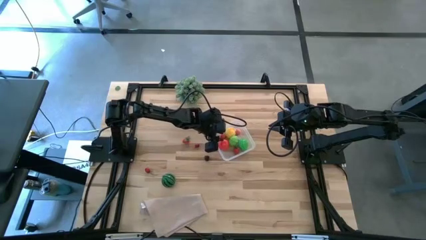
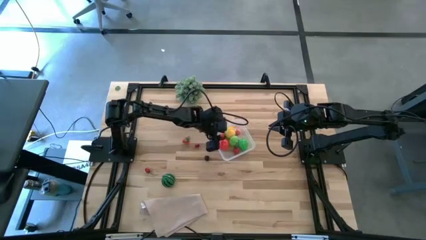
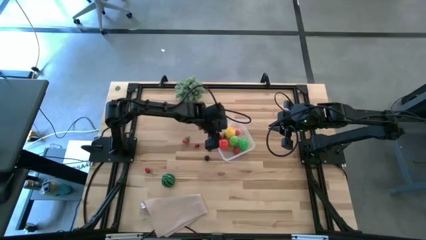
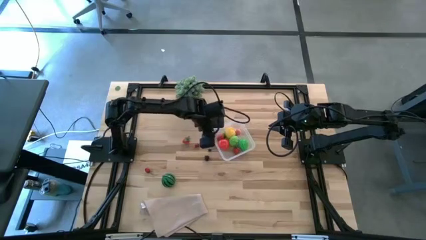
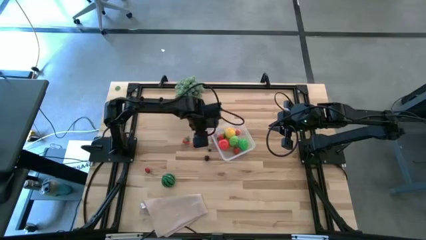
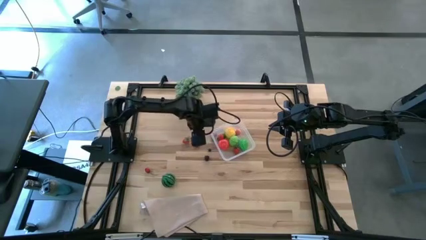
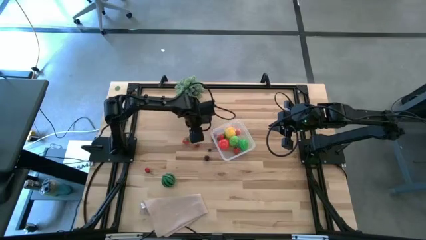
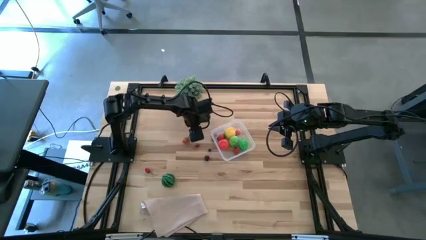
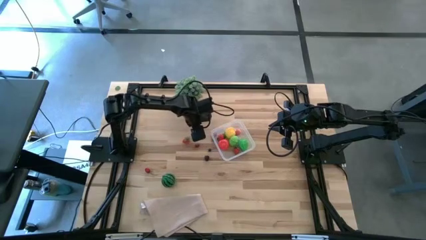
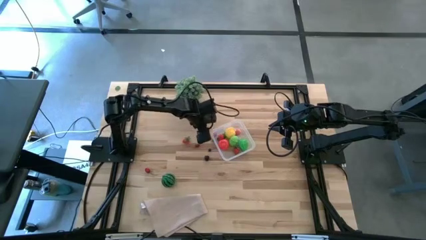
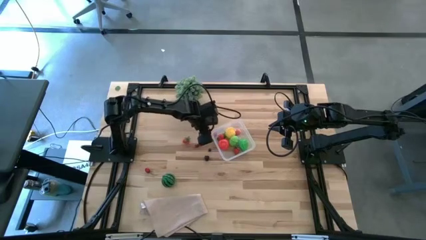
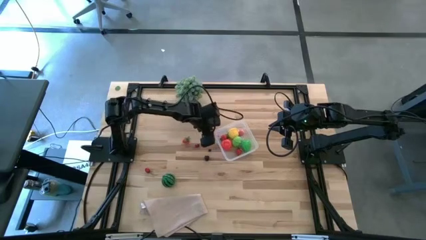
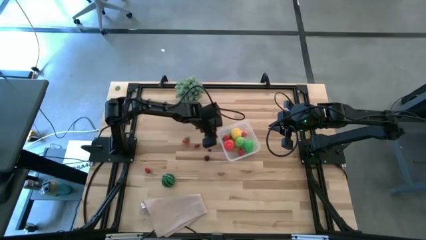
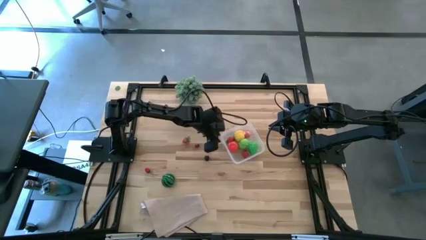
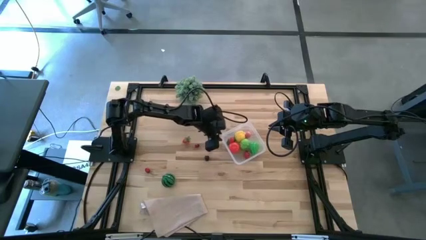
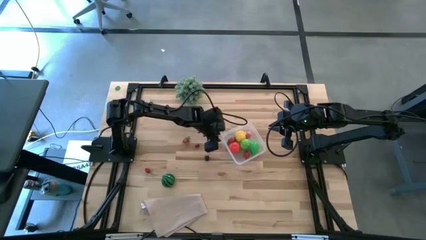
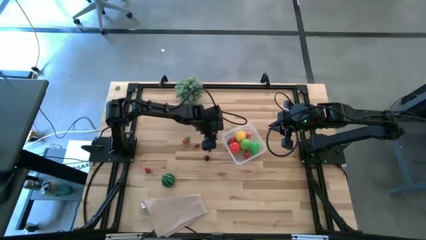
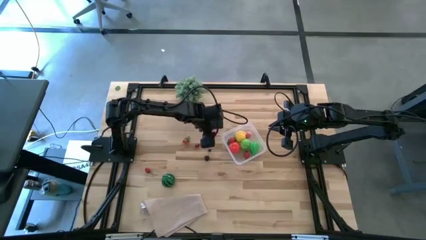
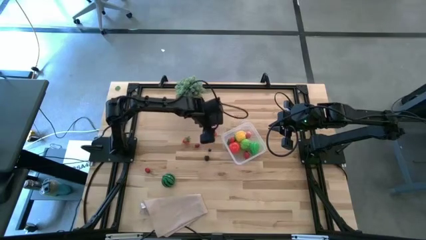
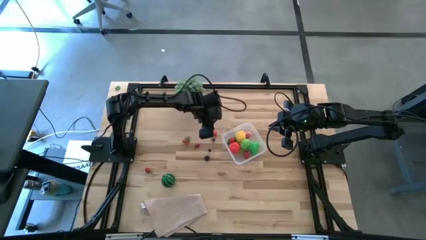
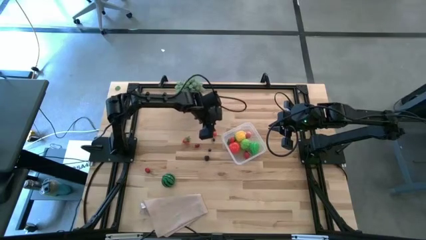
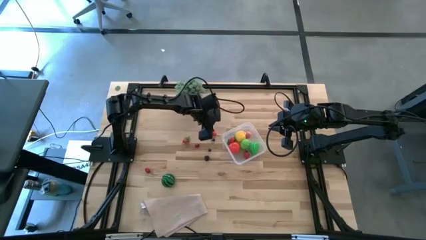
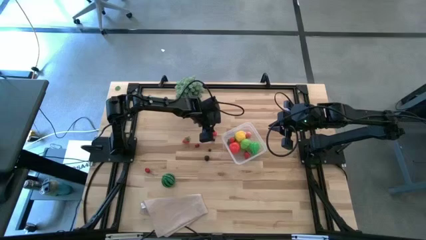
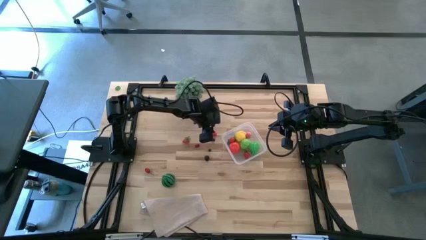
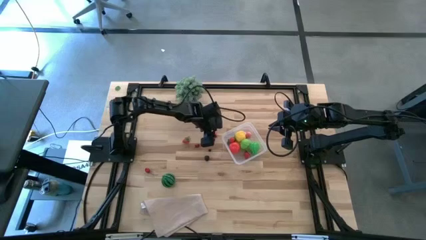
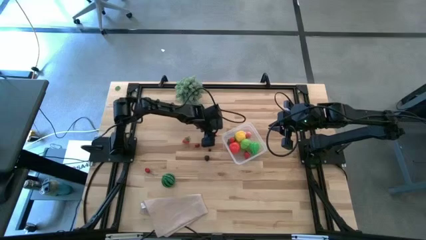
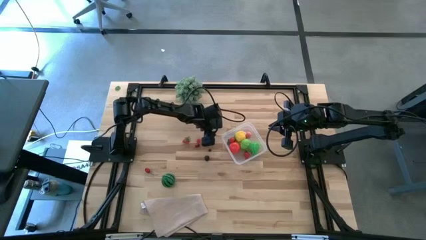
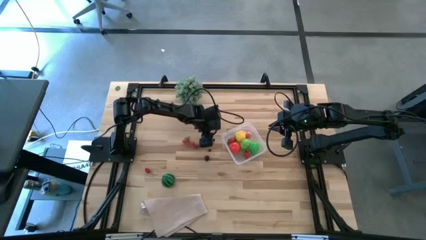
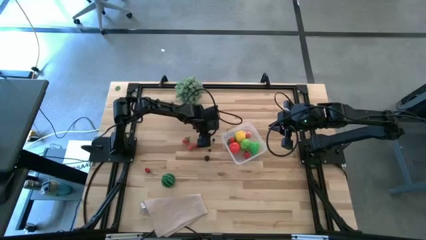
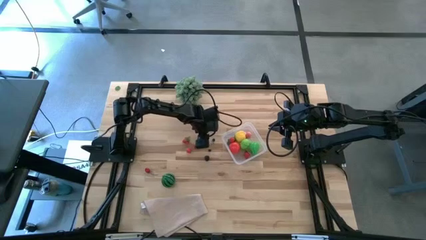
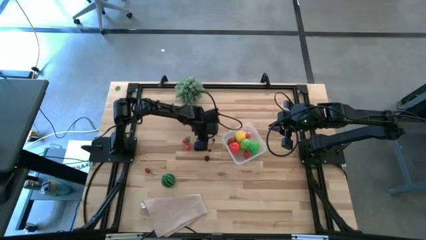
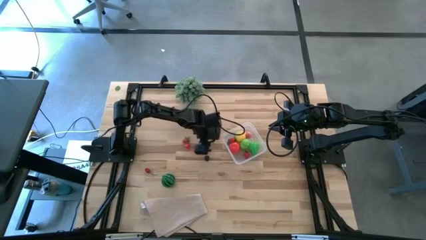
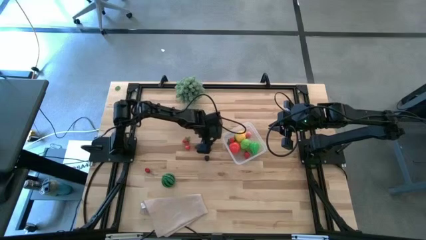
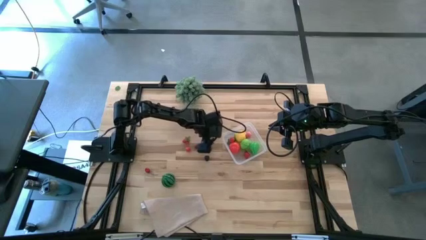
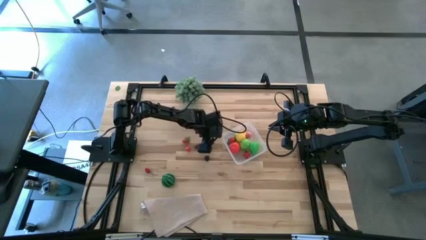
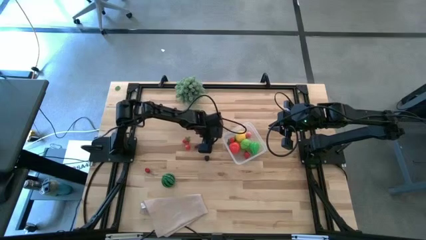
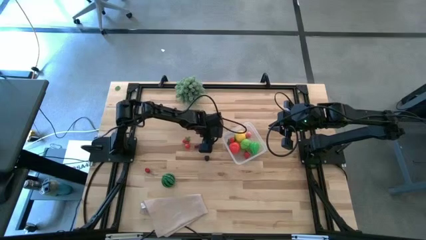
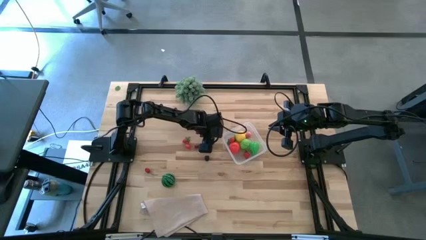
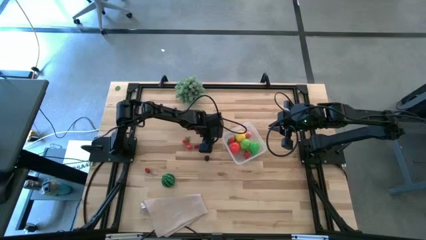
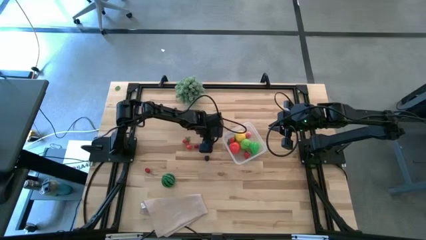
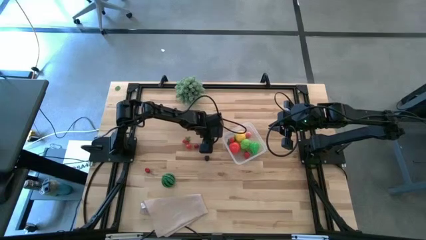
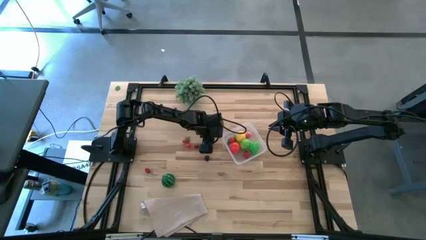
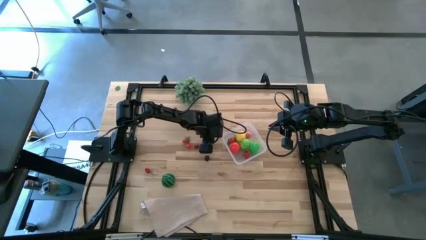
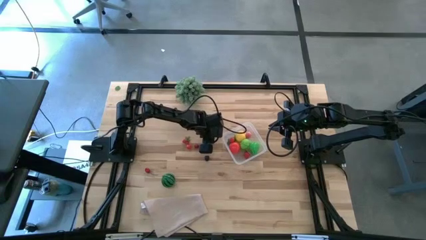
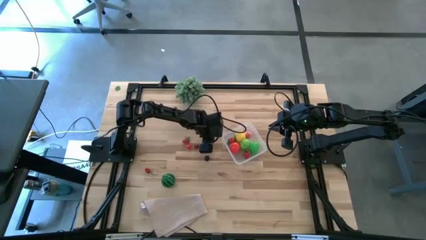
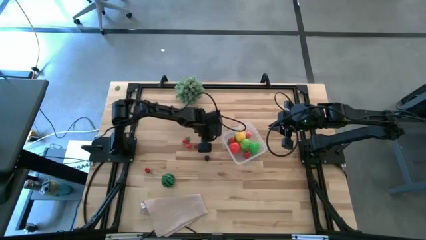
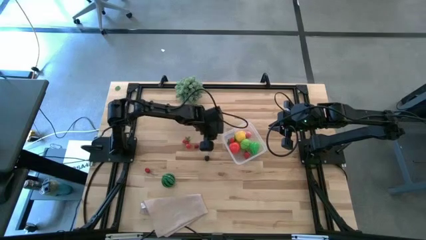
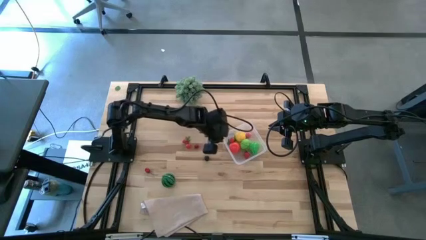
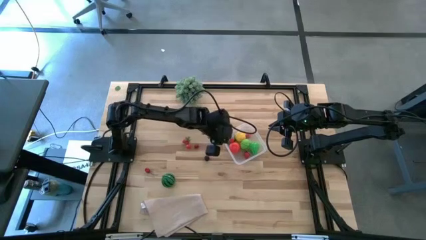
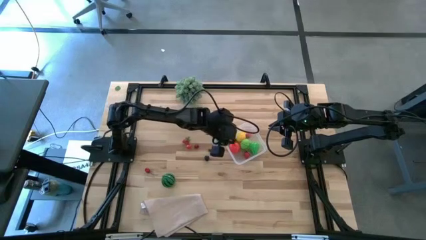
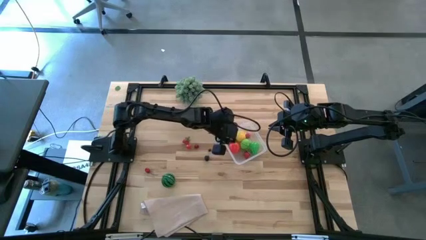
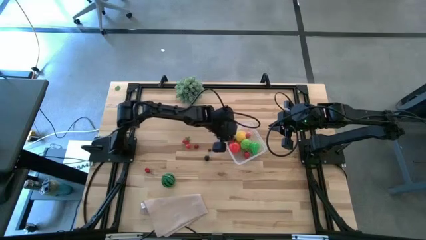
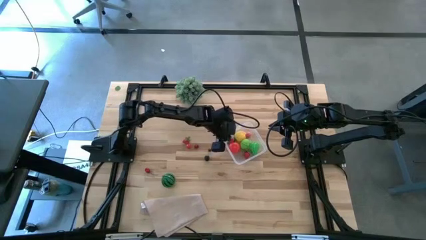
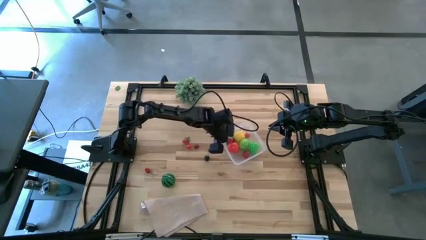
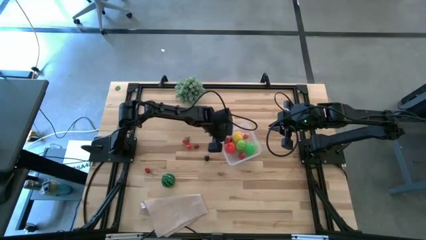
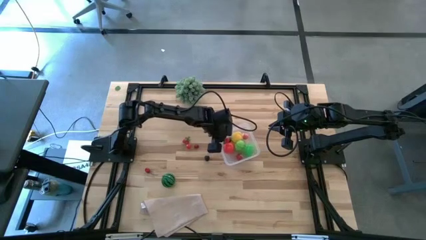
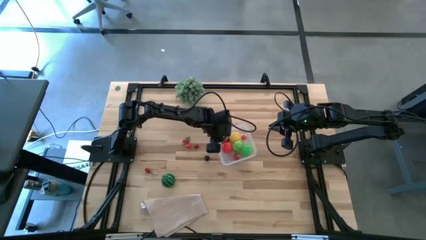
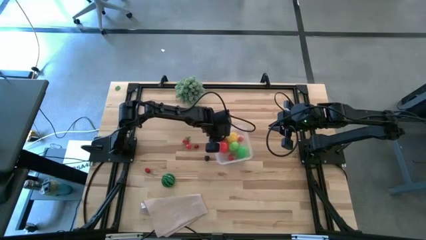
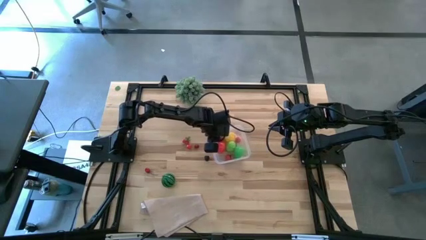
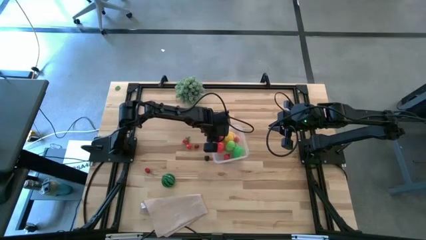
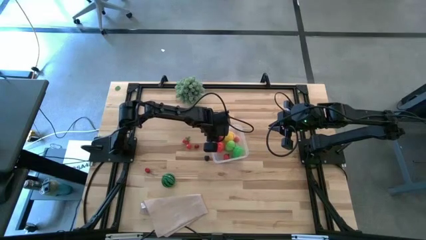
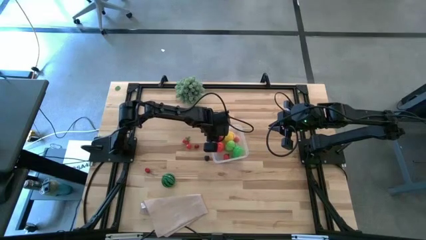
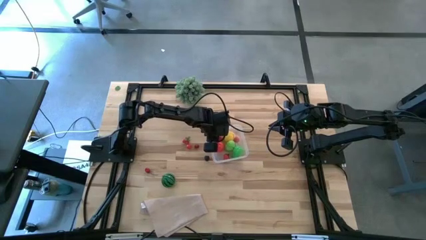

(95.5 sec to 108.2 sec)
Task: Pick and placing Produce into tupperware
Put the top blackberry into the transparent bin

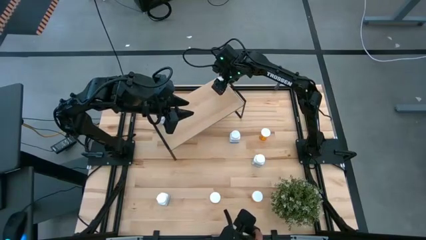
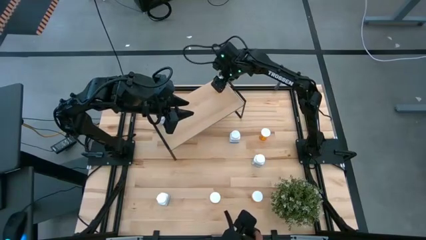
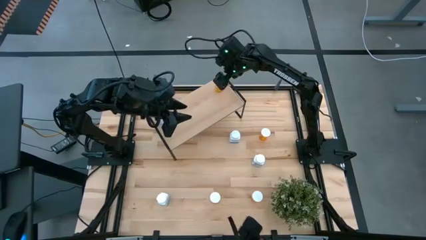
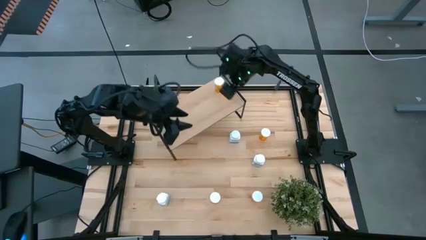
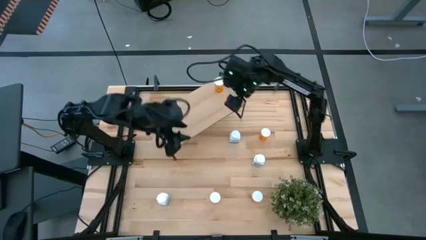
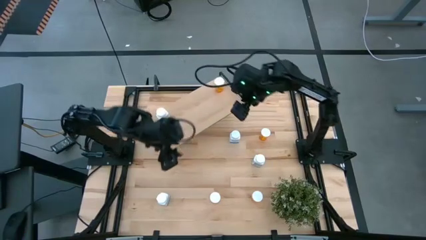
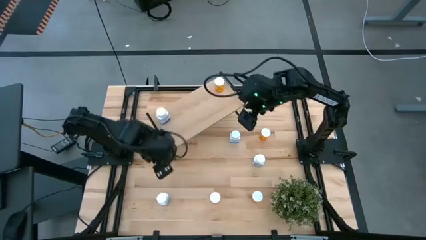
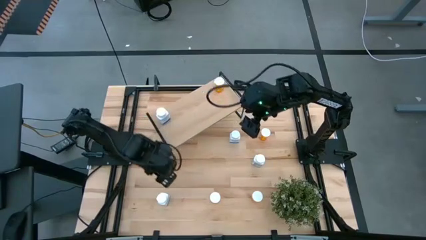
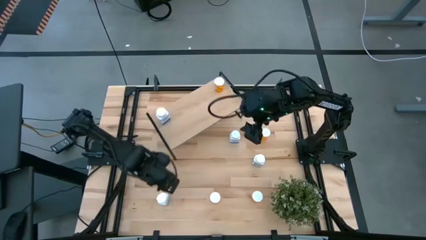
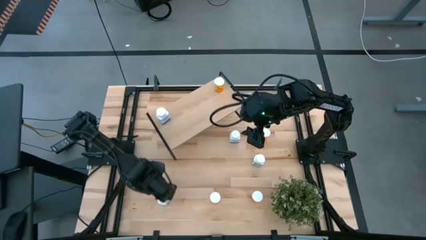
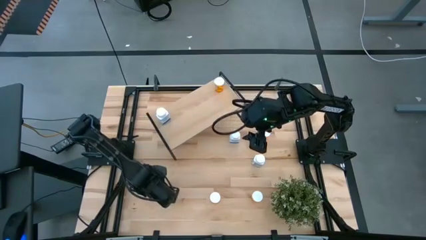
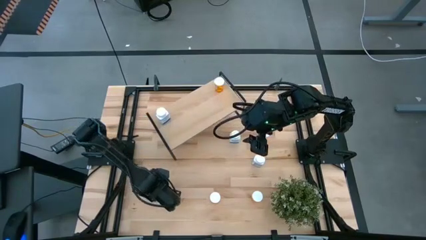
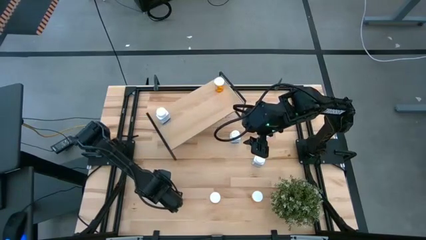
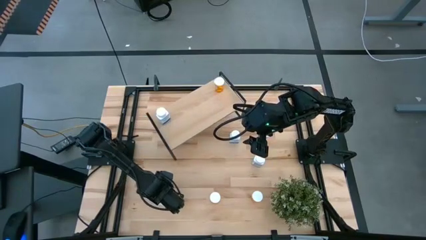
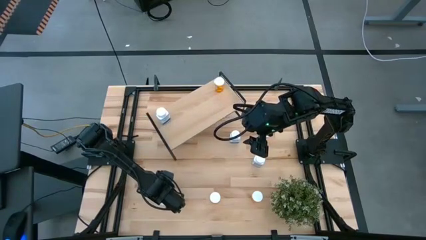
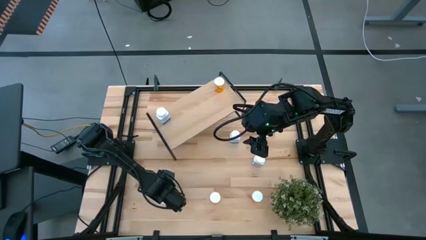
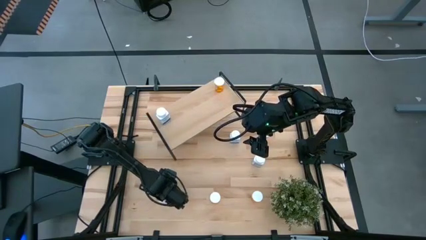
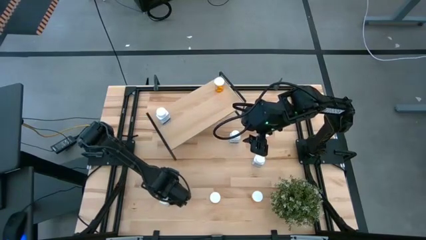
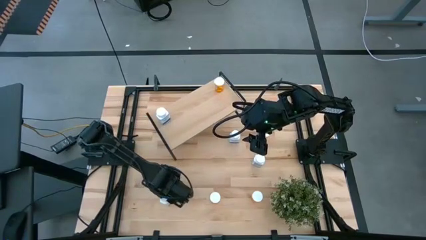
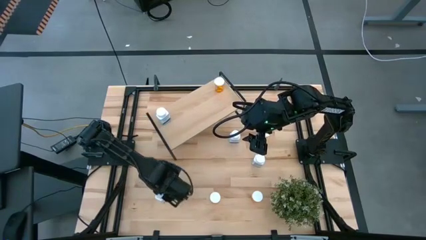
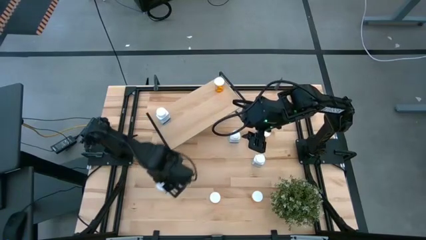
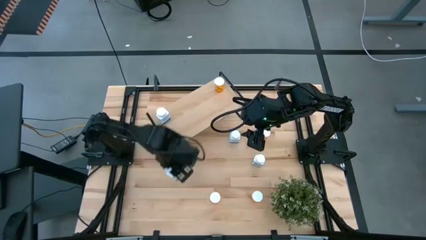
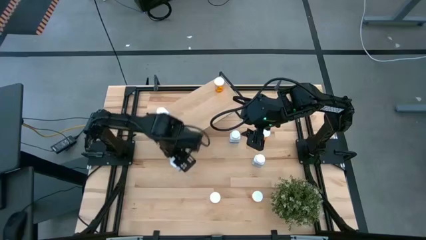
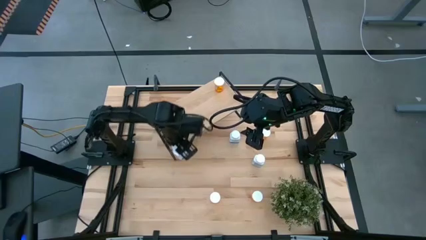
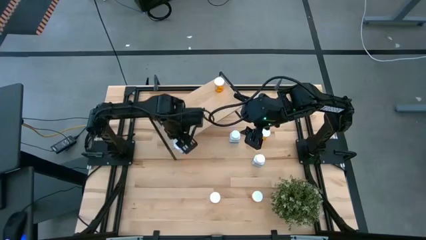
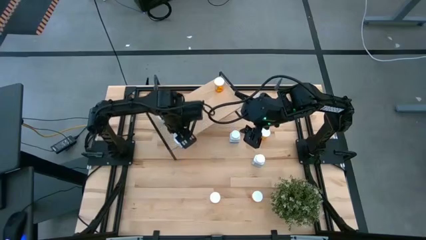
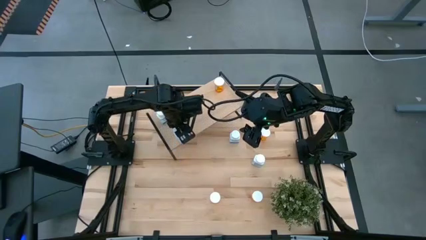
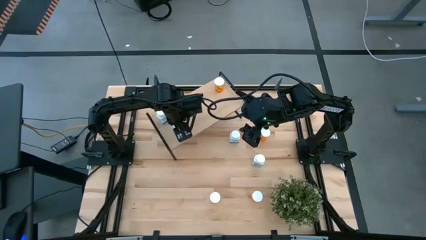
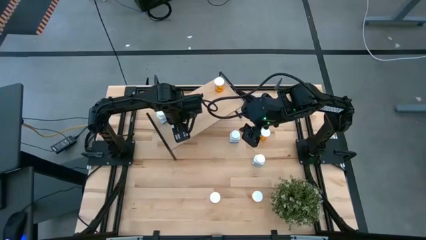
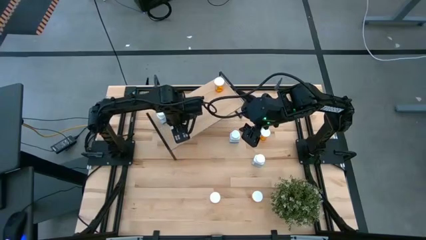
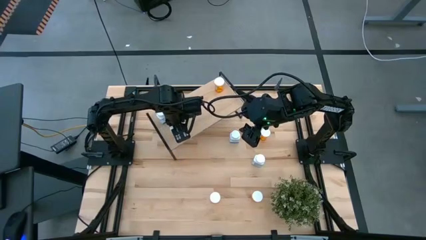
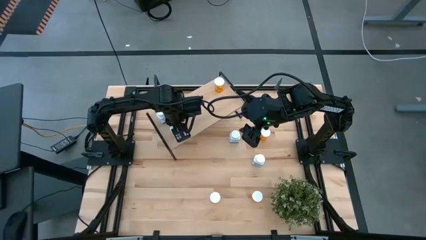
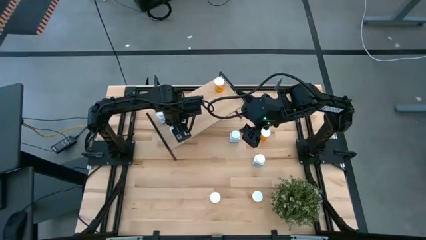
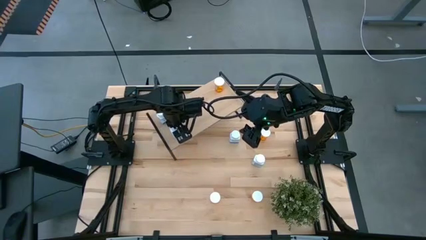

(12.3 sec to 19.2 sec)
Task: Pick and place medicine bottles onto shelf by color
Put the white pill bottle on the shelf aligned with the other white pill bottle
